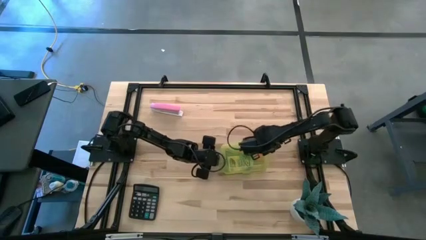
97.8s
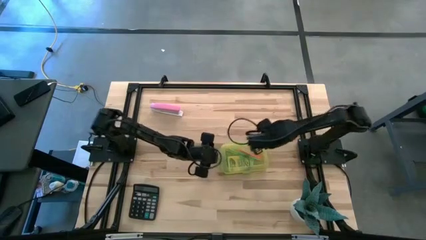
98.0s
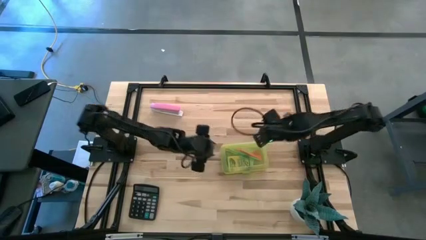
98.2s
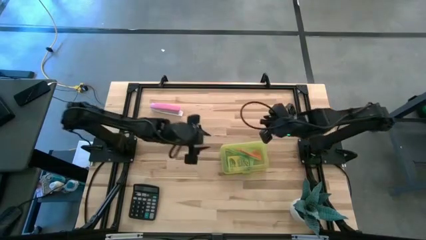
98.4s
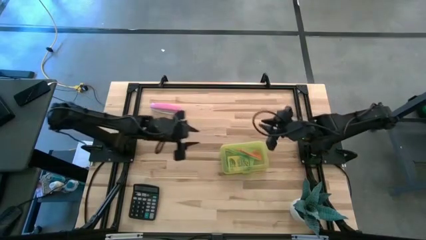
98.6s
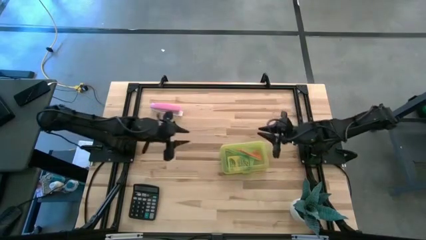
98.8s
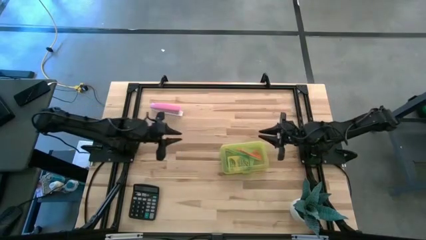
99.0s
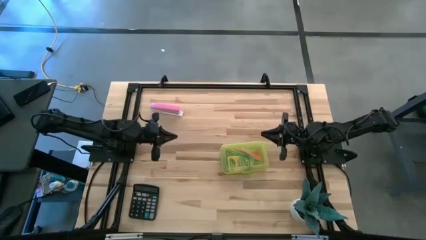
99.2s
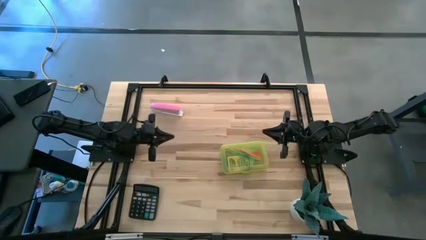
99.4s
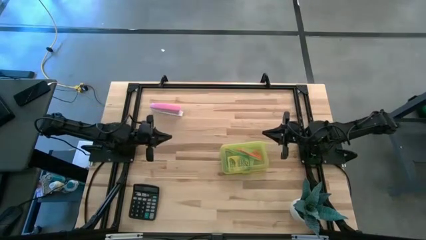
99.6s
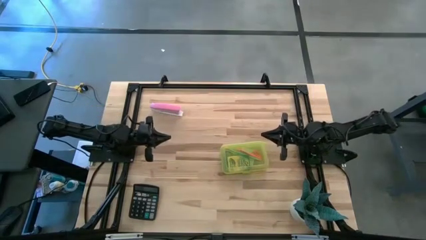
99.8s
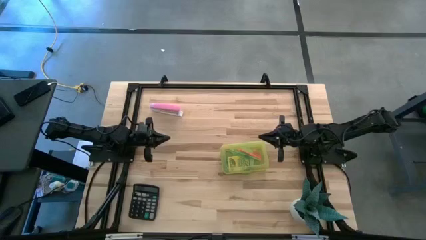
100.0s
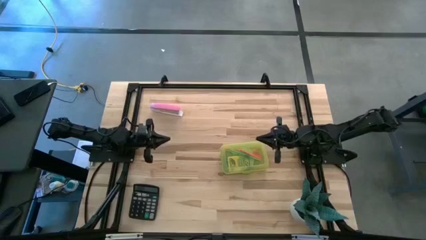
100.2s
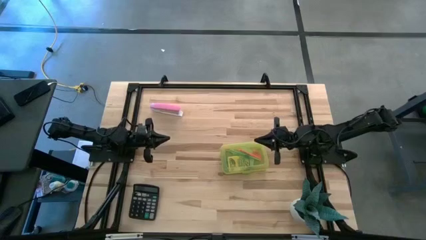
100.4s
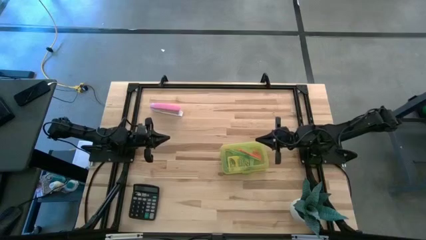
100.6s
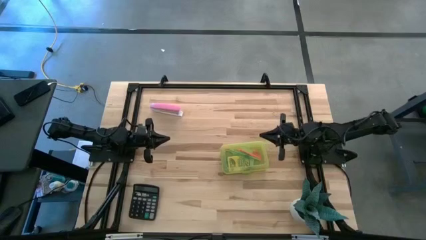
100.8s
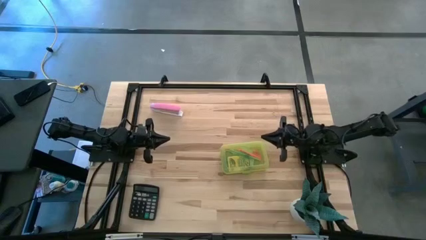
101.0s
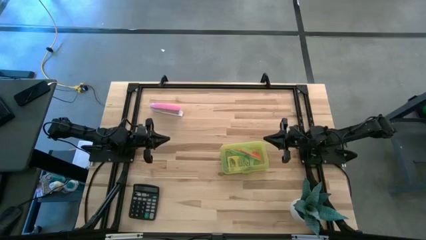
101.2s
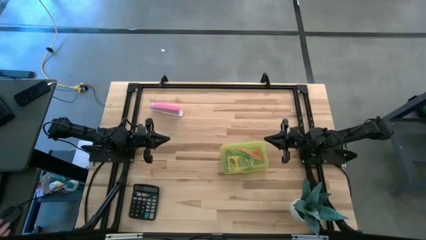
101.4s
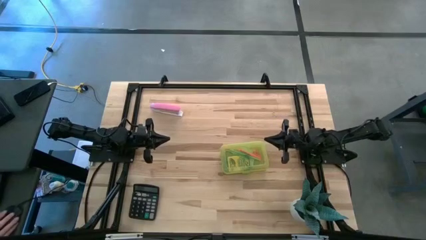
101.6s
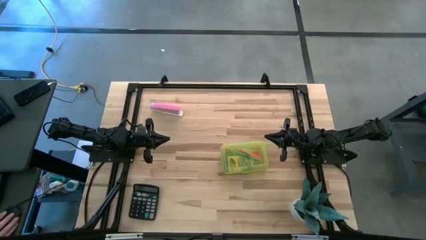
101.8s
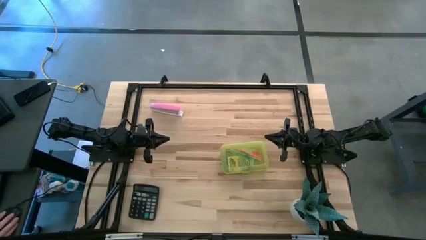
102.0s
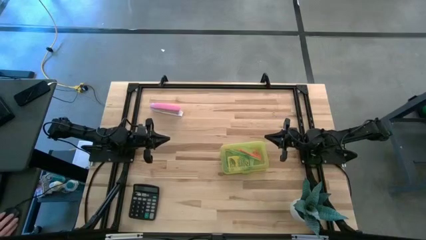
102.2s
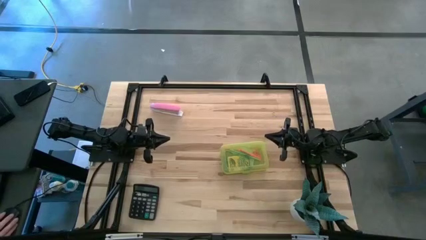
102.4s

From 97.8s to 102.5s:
Task: Pack school essentials
Return to Home Position

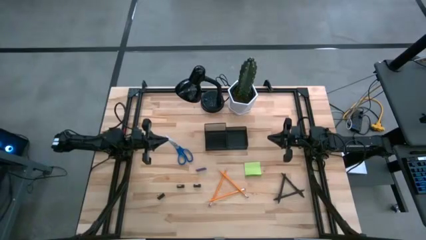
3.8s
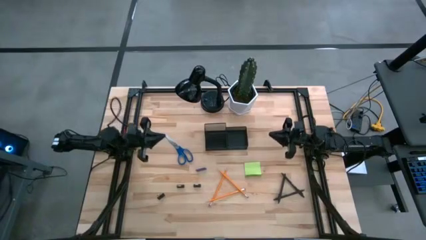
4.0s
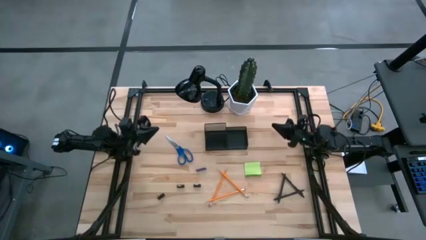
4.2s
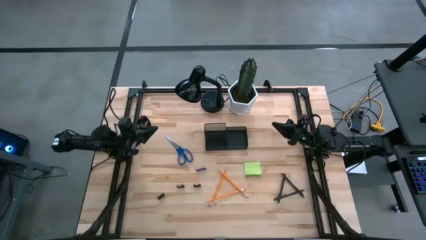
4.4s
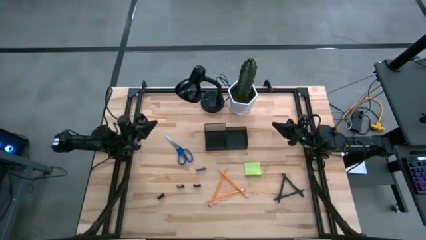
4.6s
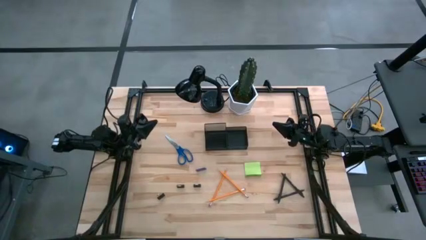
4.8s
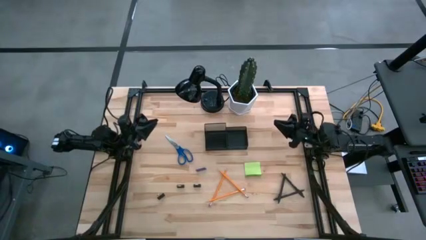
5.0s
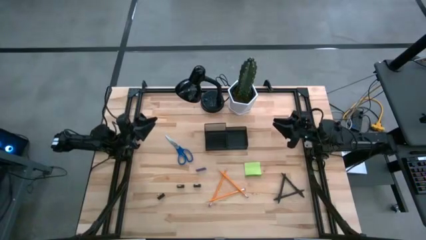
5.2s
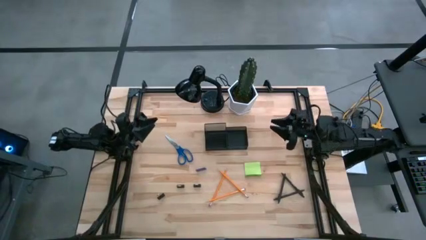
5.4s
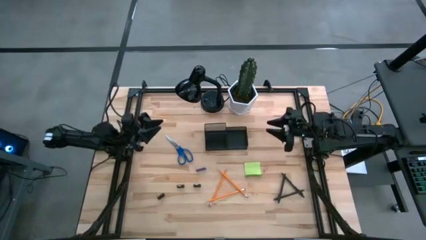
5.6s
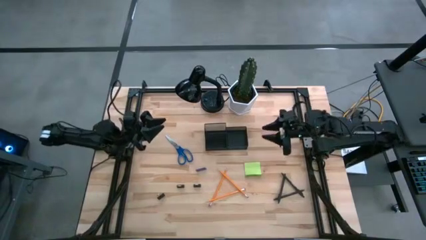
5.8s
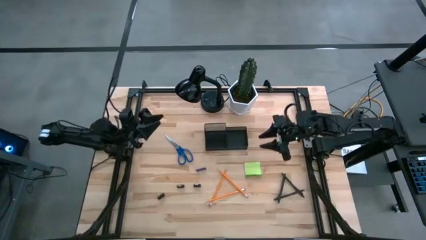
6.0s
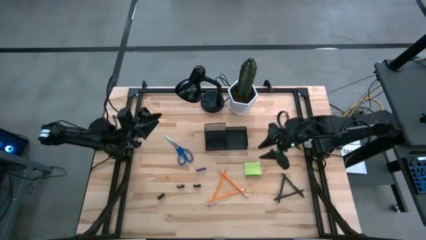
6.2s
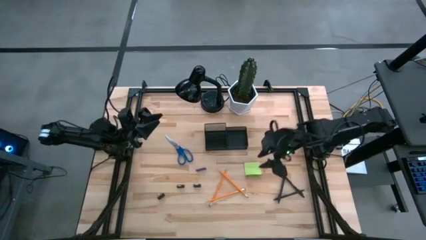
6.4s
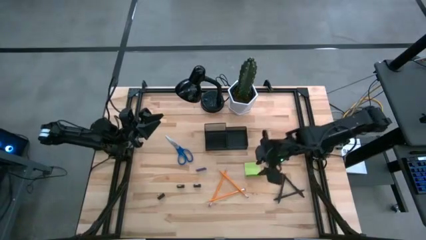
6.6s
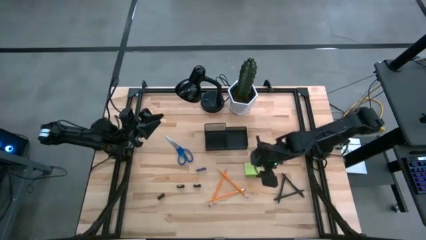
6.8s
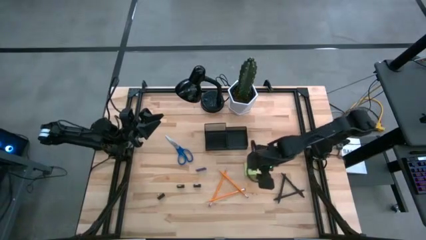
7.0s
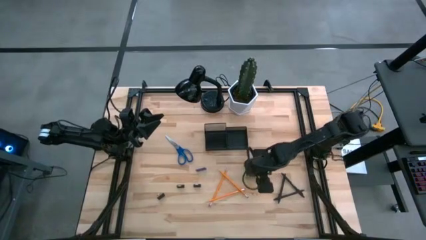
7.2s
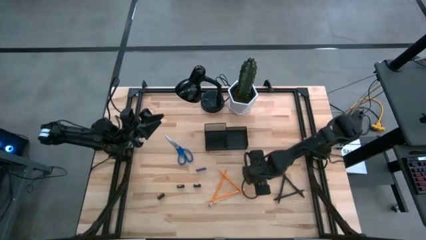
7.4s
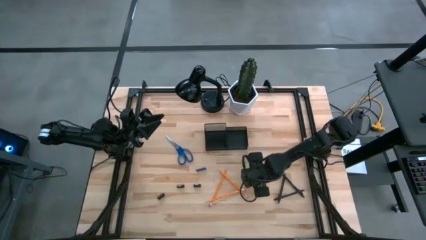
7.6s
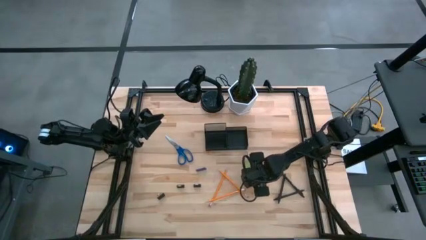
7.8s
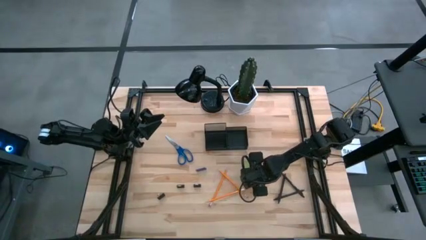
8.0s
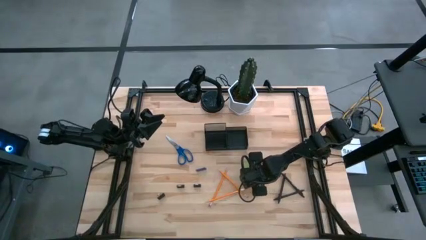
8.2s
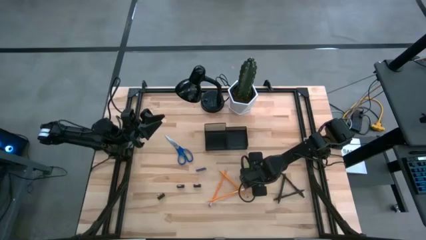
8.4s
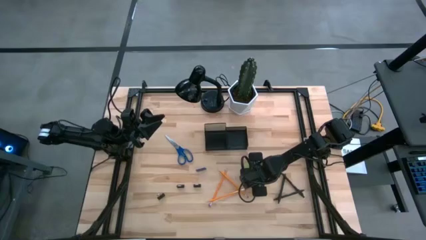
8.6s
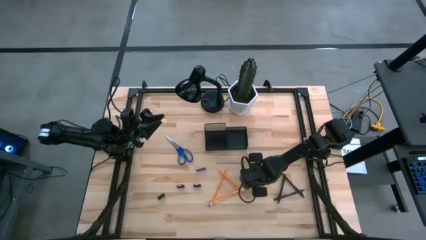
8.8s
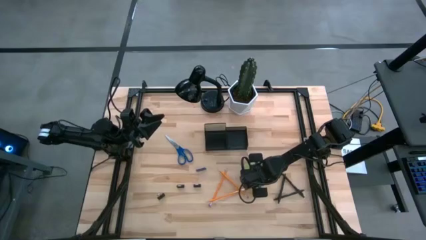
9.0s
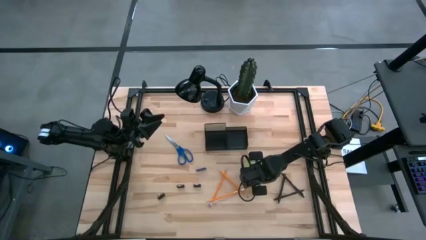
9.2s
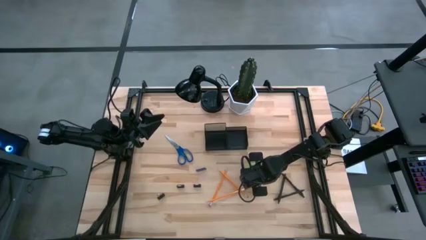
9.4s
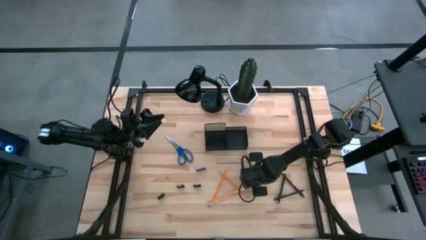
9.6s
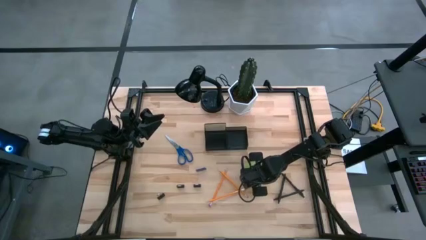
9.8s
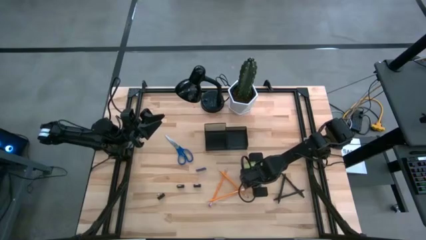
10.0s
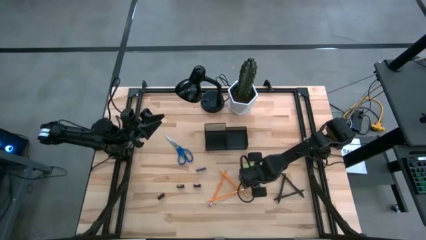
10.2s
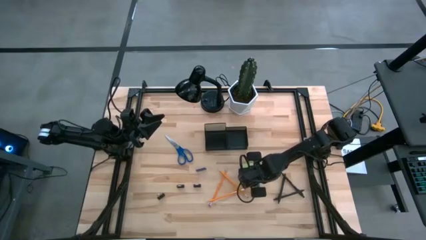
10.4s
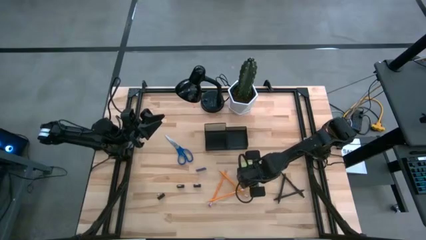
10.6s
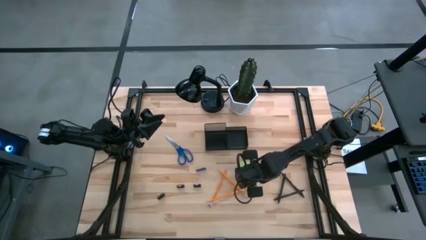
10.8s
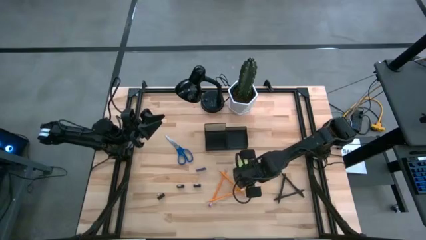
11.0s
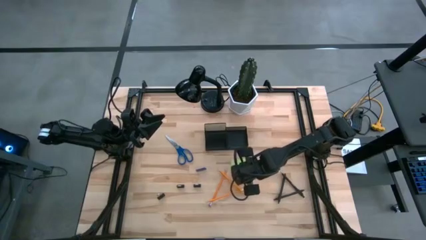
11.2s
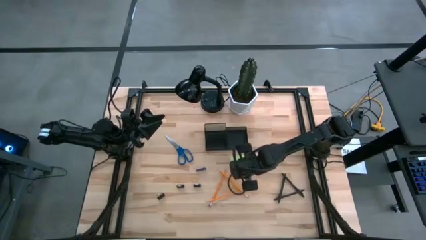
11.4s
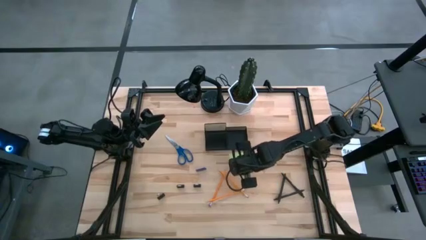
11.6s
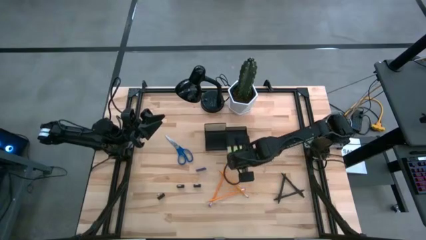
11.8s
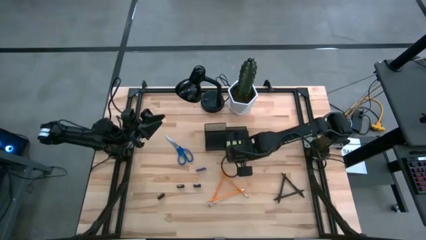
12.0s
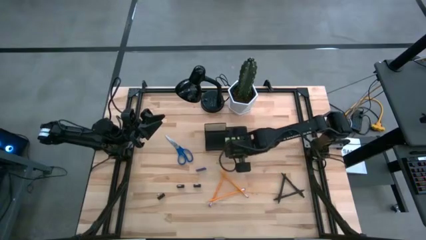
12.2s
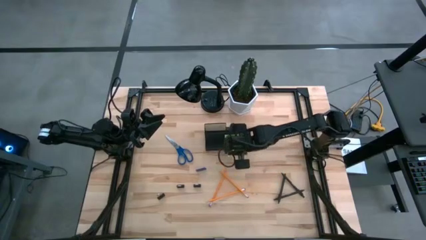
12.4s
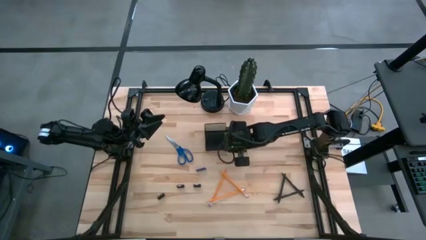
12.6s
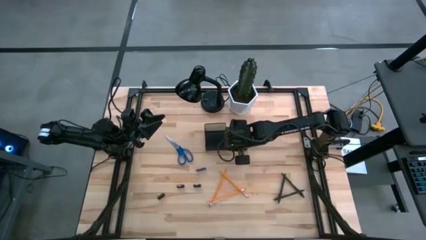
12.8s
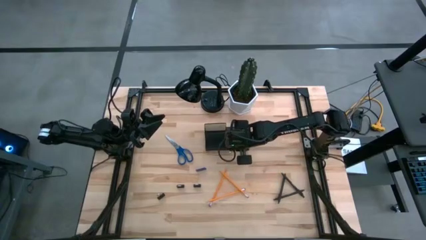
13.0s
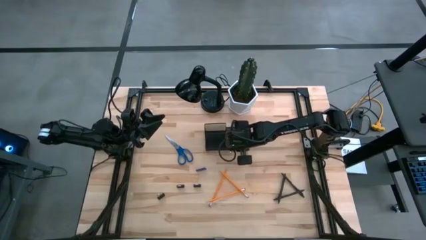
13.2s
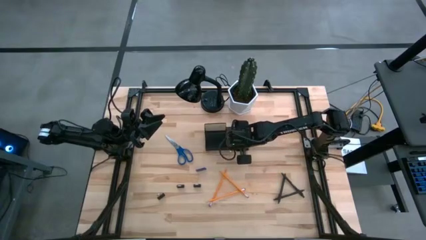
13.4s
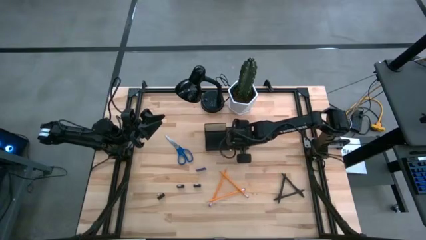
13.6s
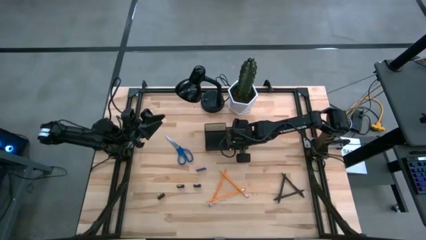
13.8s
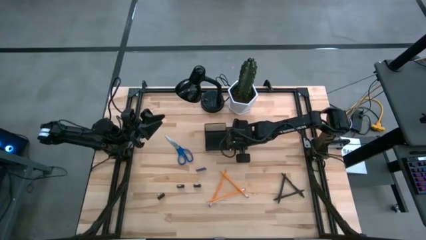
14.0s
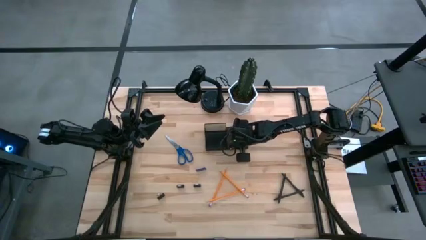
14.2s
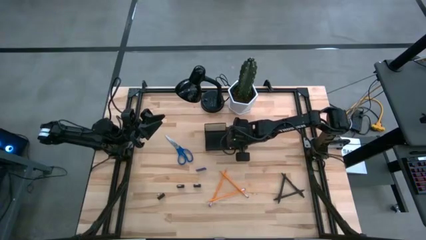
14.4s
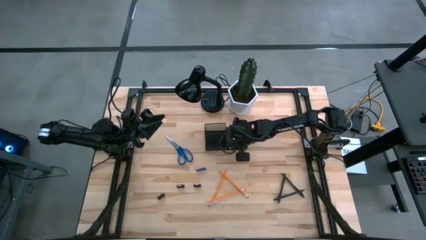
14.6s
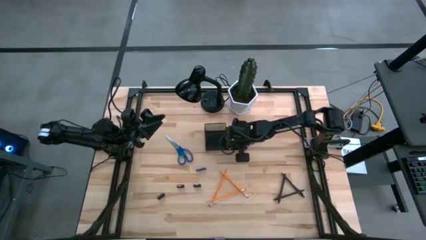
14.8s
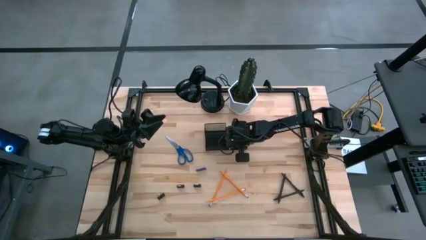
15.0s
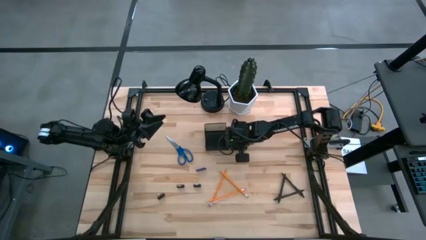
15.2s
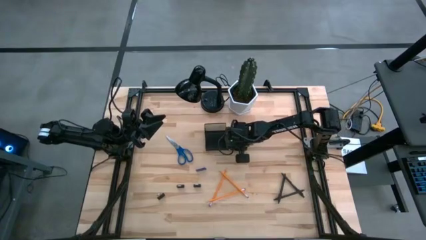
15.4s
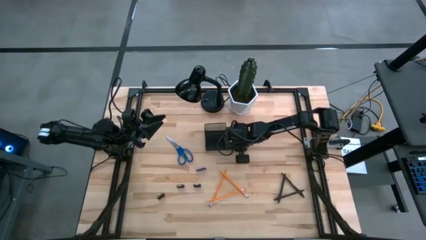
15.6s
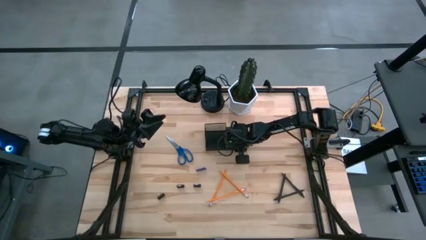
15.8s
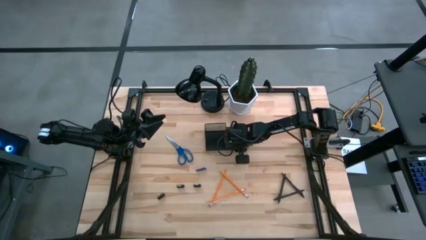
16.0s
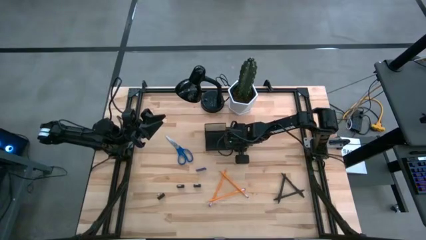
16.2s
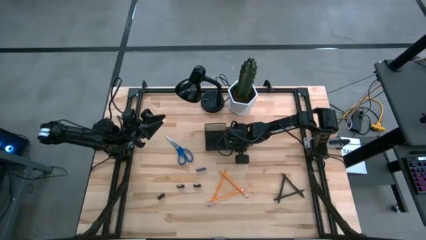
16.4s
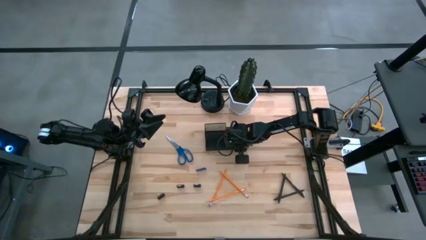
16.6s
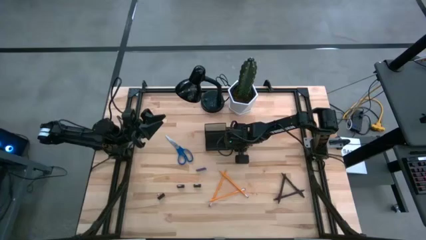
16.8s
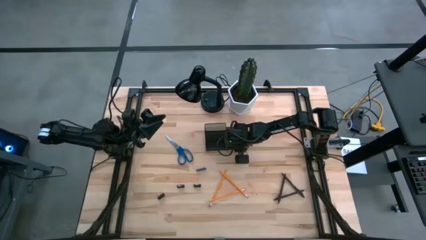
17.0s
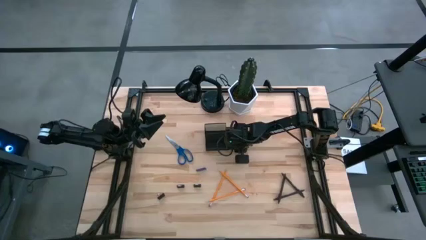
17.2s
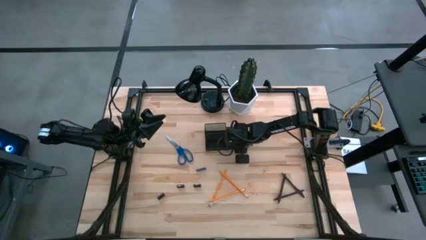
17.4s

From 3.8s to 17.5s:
Task: Pick and place office supplies into organizer
Put the green sticky note into the desk organizer
